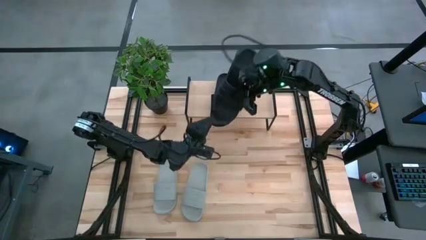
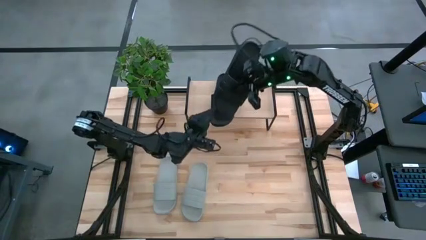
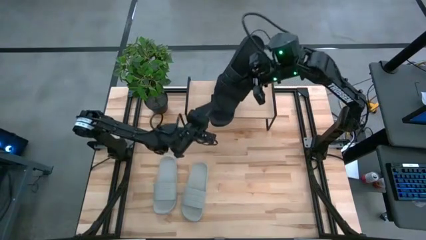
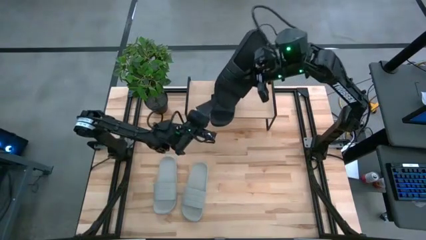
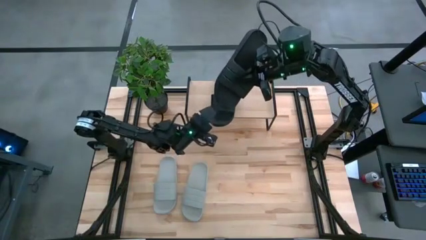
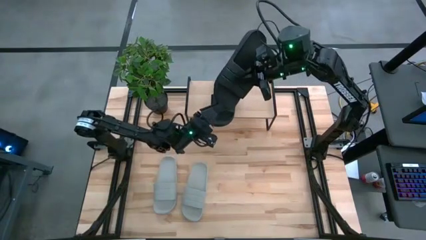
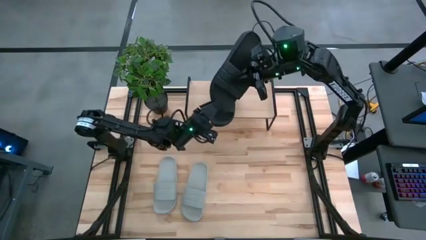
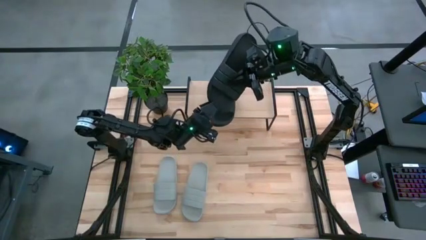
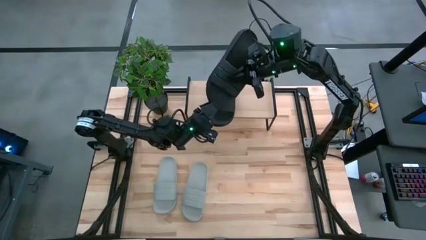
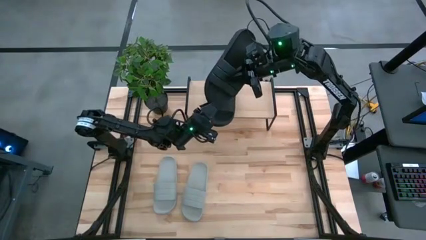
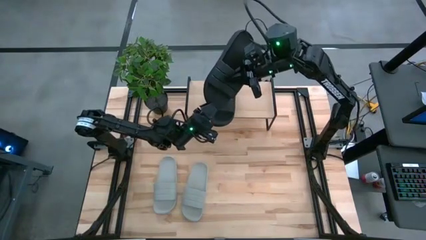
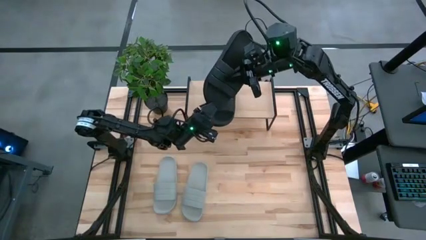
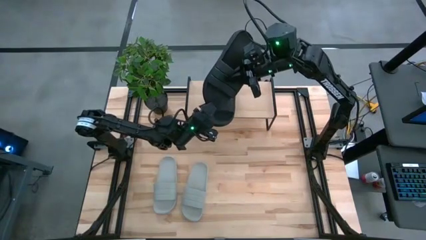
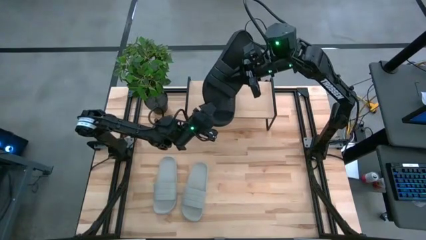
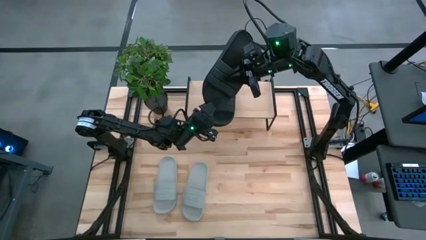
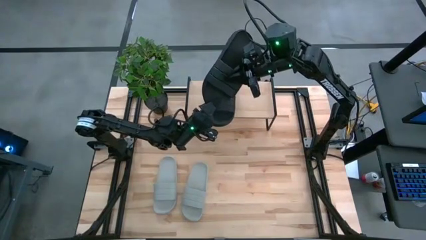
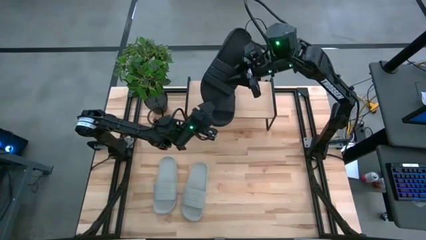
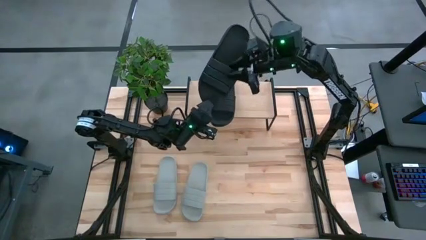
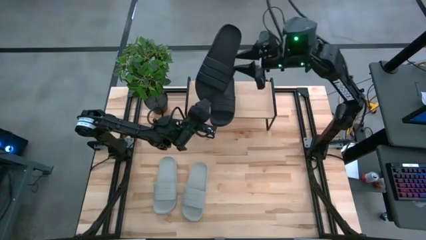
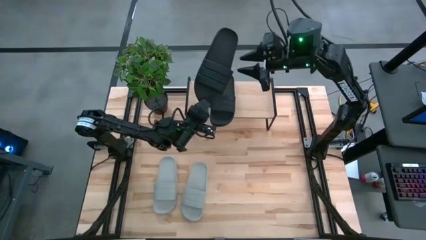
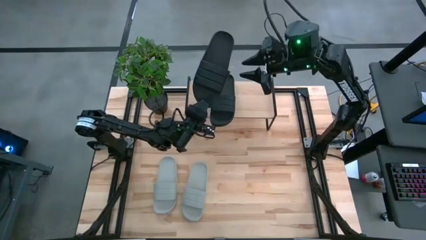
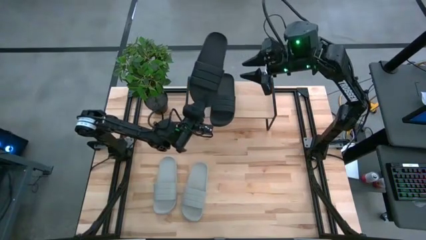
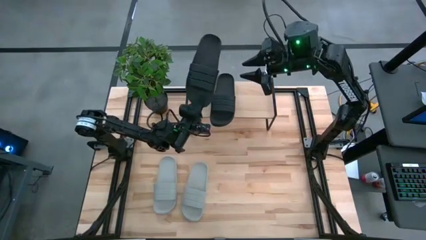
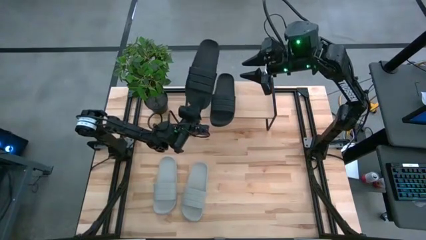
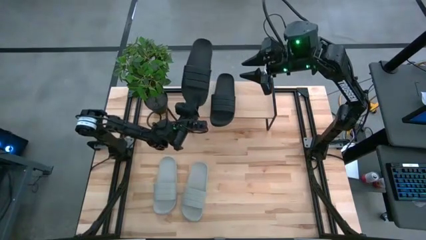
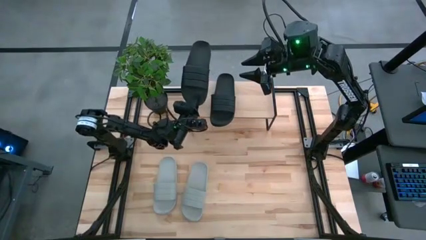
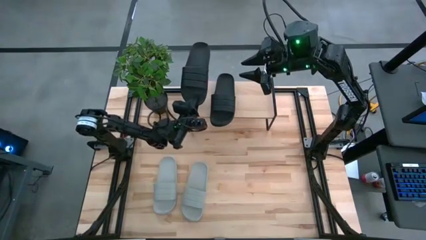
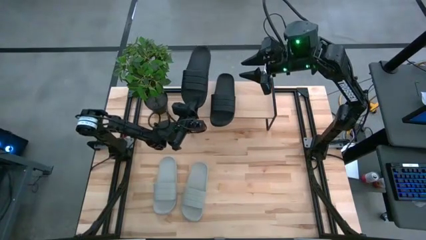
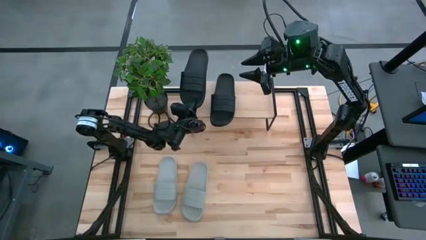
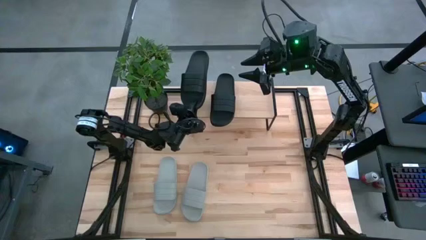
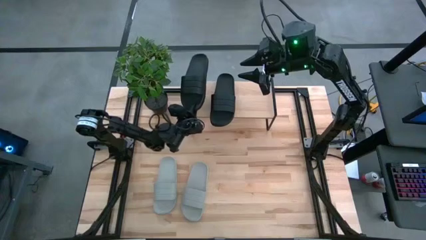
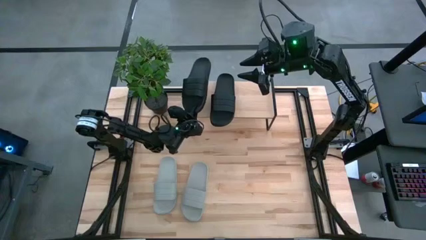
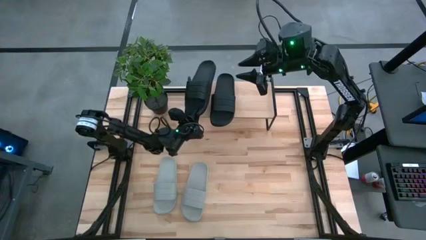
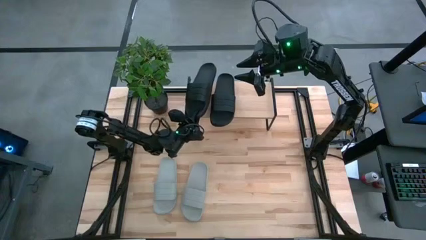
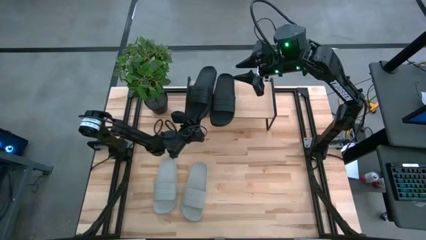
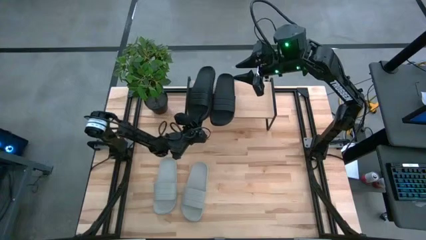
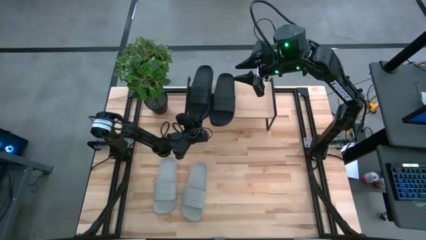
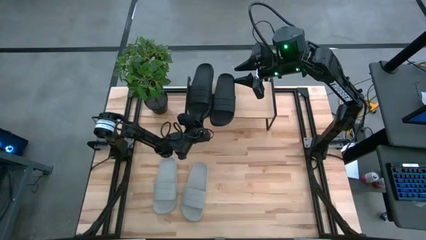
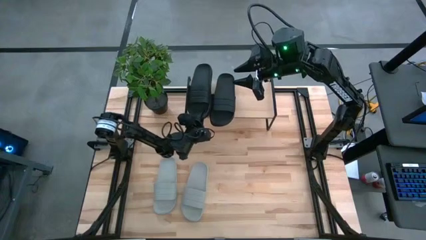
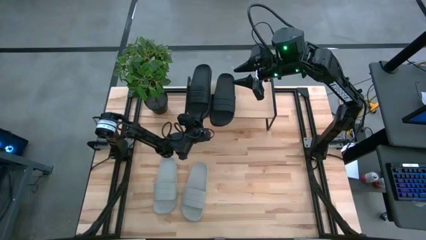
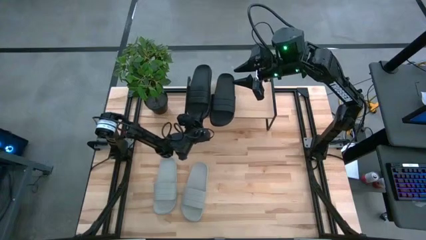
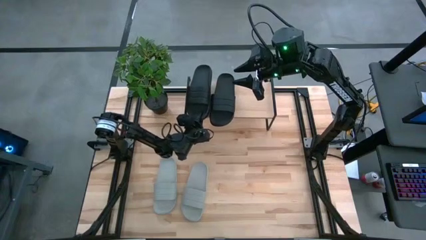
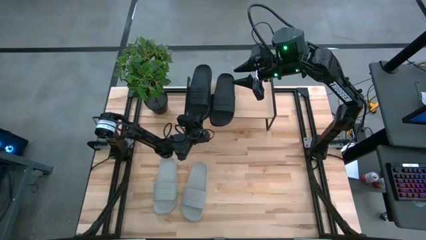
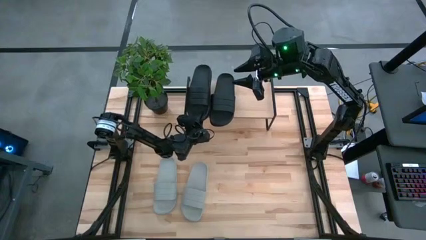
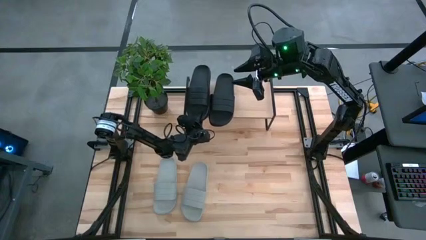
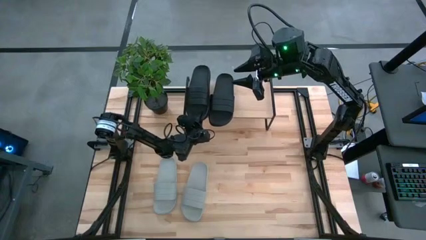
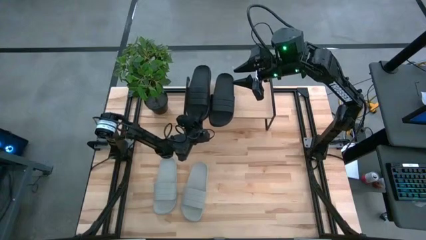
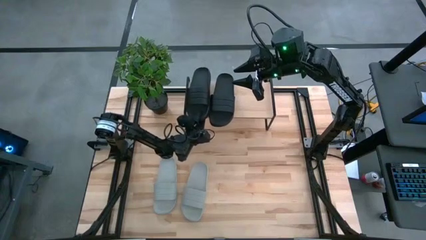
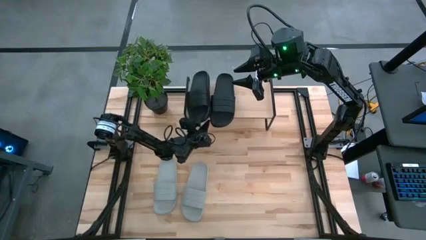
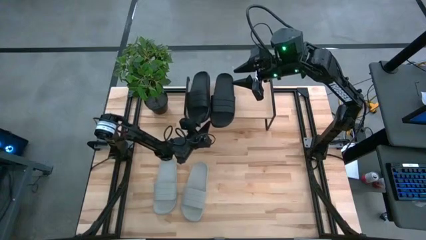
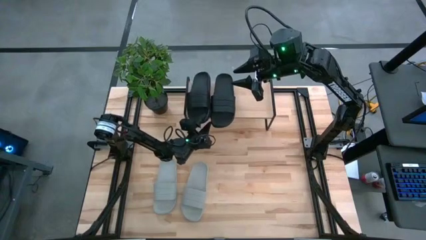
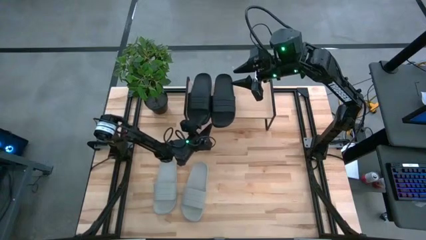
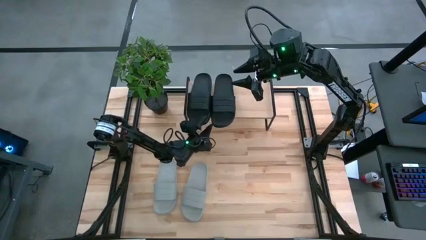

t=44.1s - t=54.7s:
Task: Pick and place slides into the shelf
Put the black slide on the shelf
